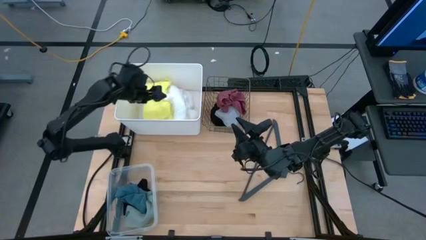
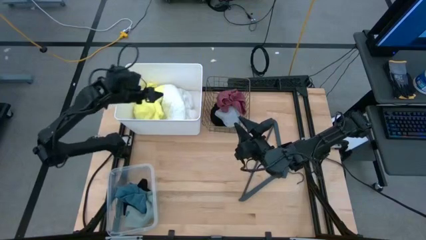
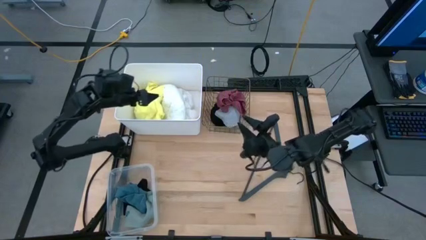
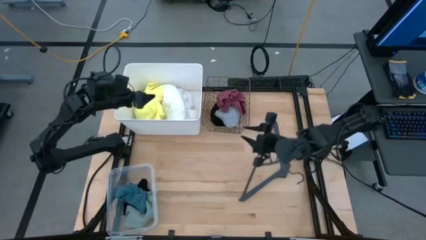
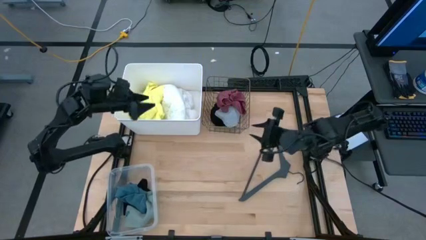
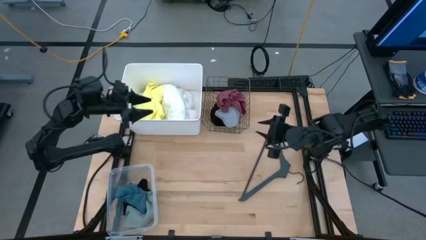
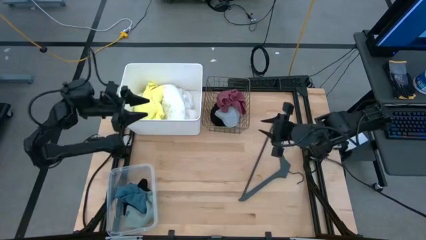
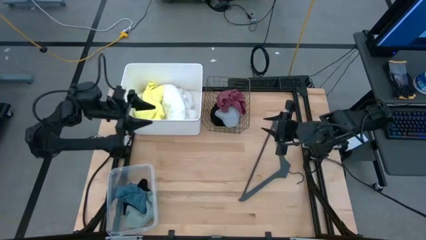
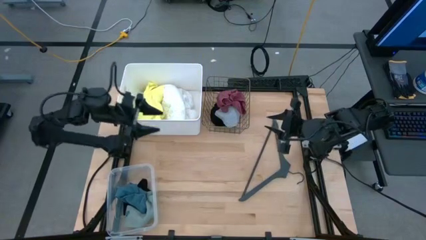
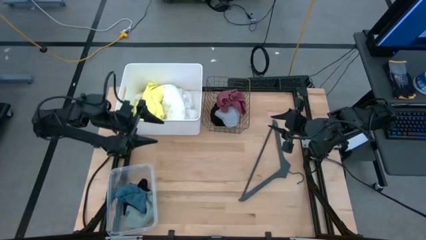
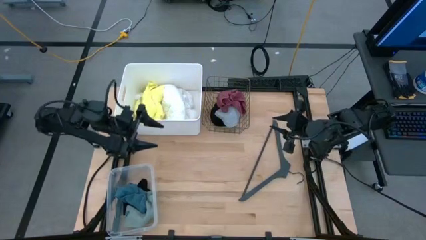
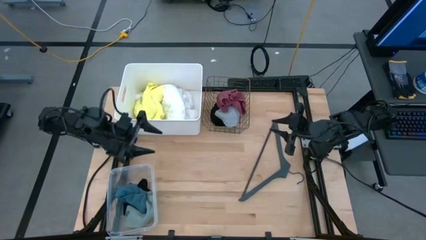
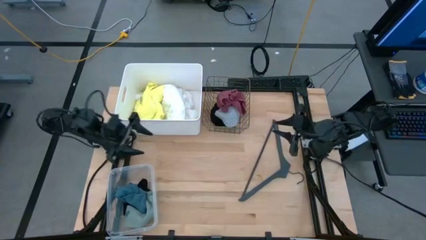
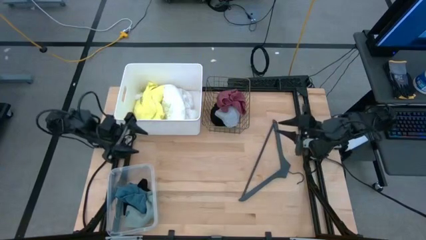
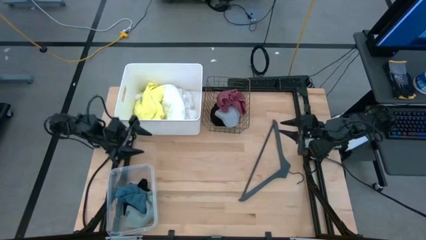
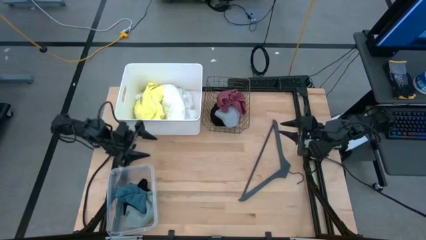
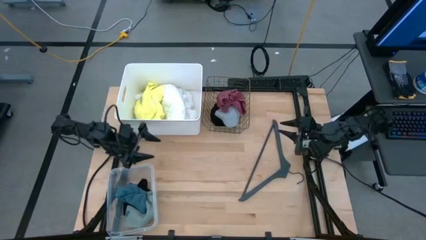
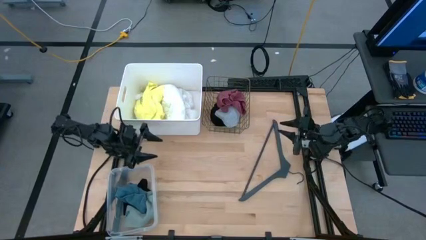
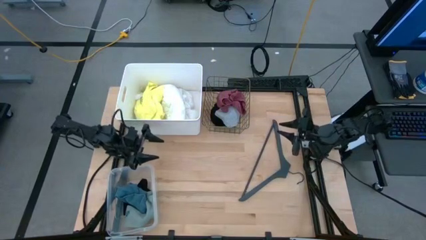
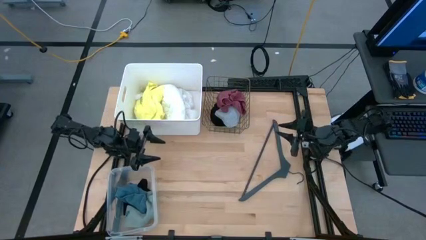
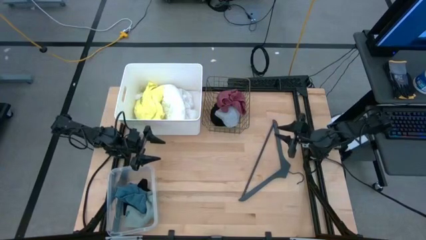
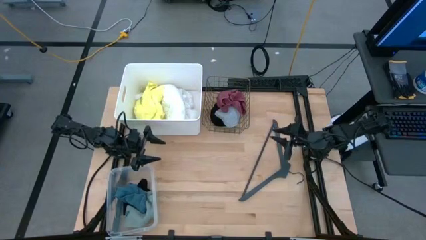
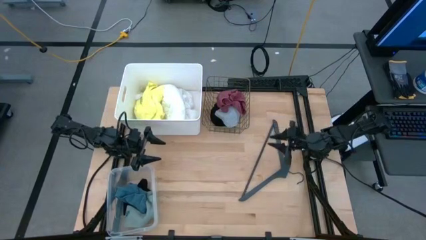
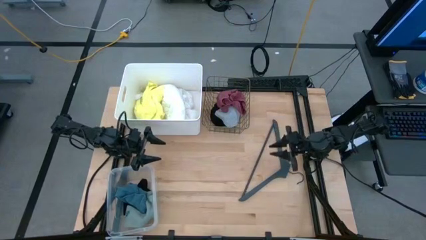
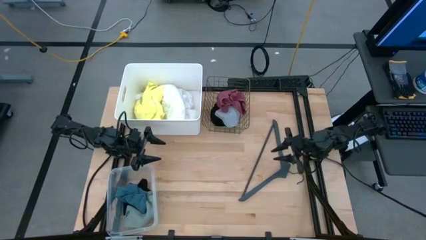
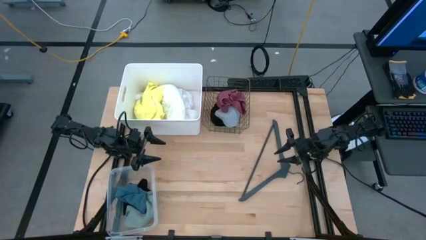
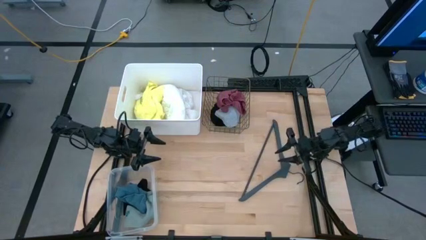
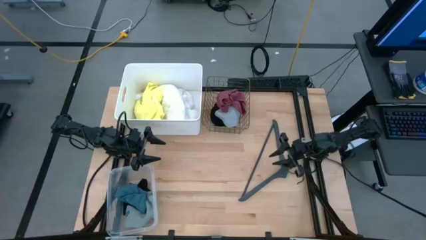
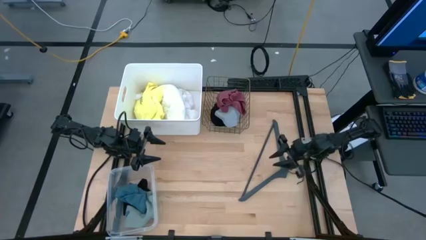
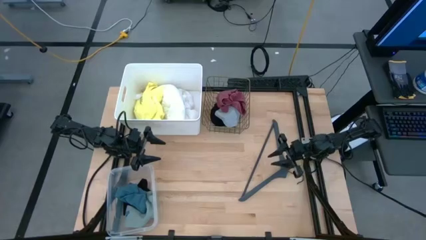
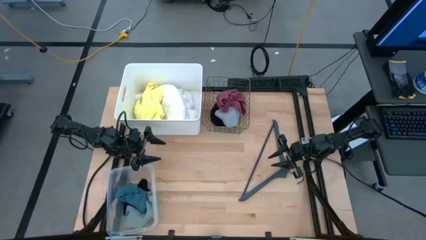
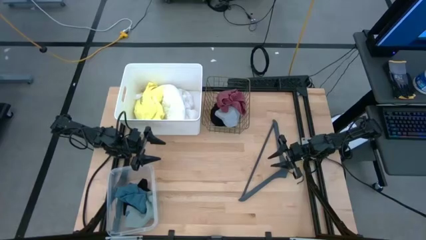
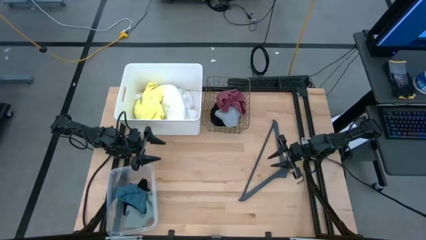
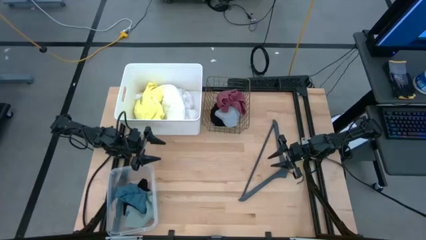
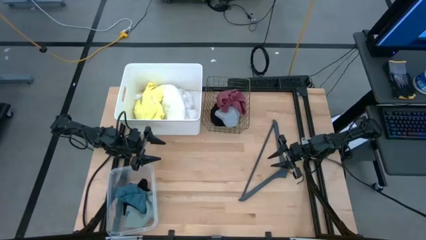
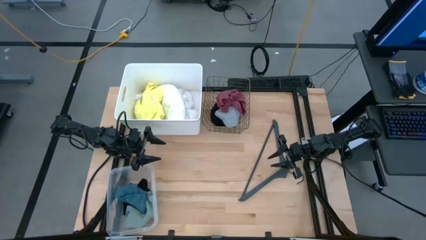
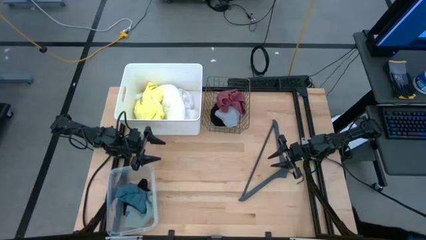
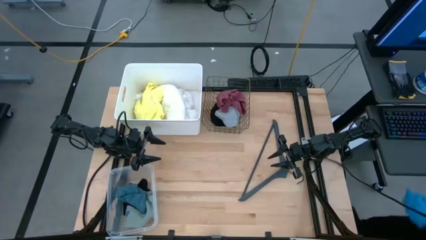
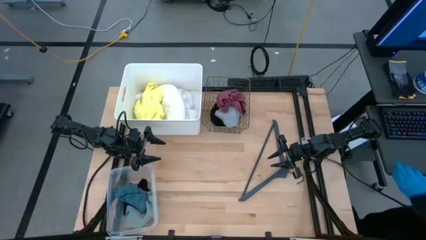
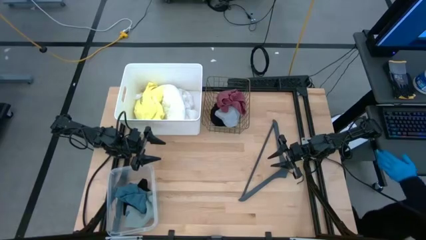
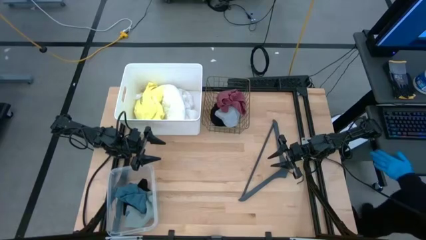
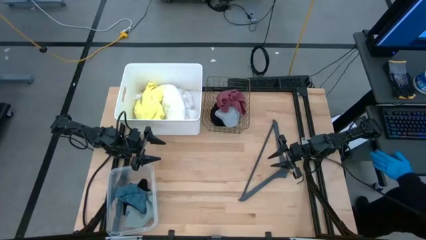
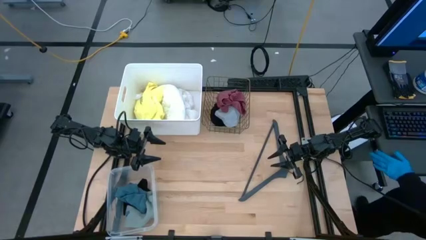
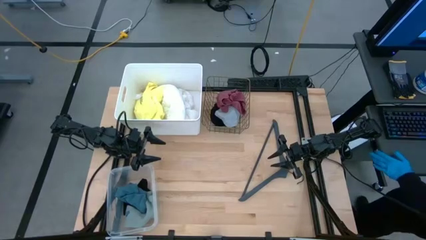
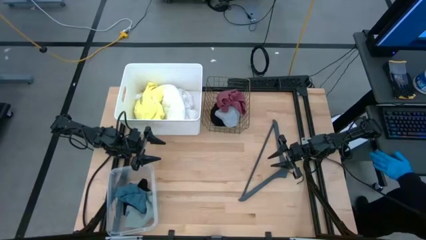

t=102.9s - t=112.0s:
Task: Pick & Place Cloths
Return to Home Position

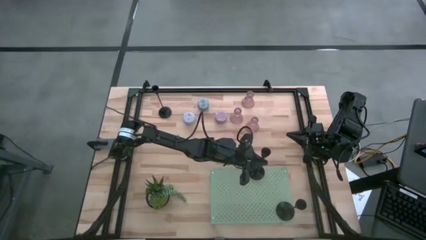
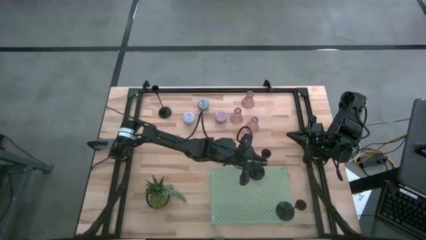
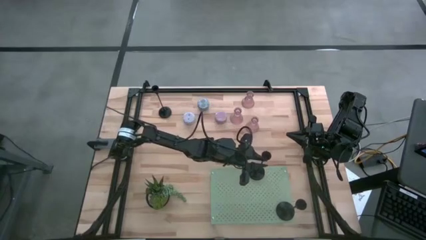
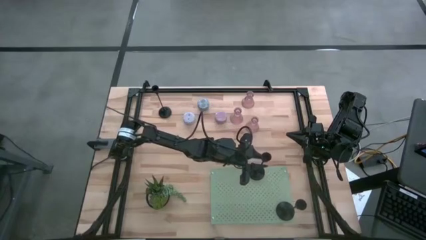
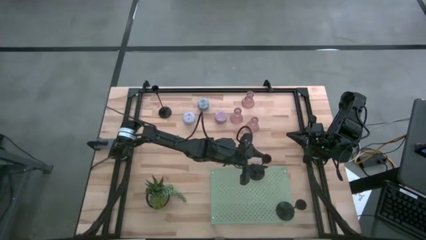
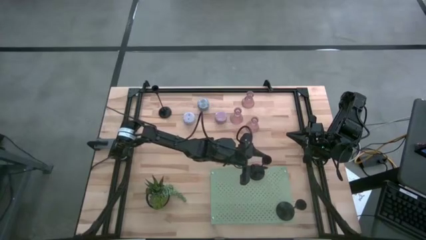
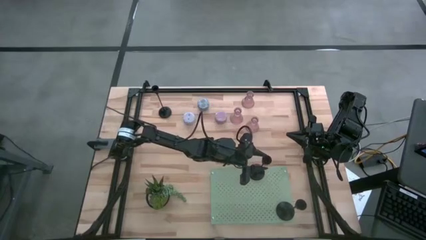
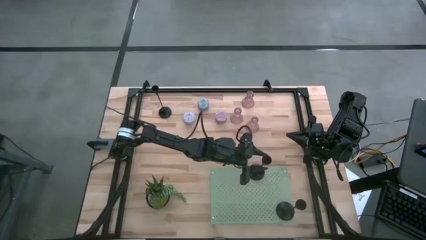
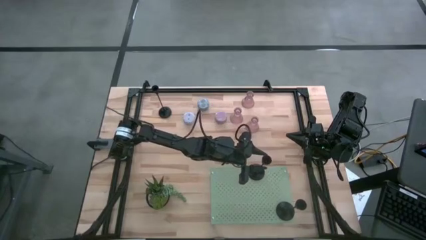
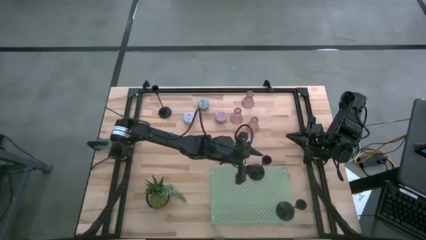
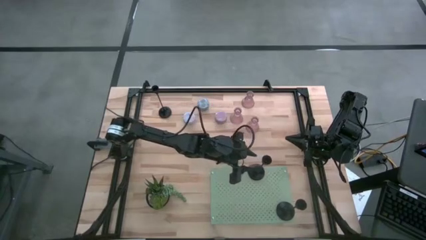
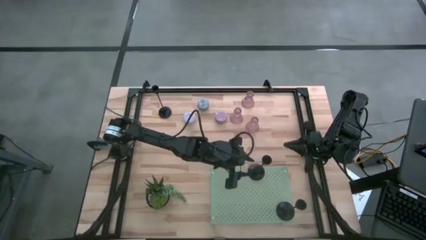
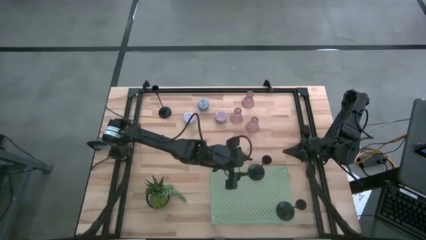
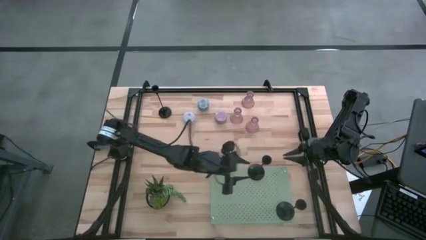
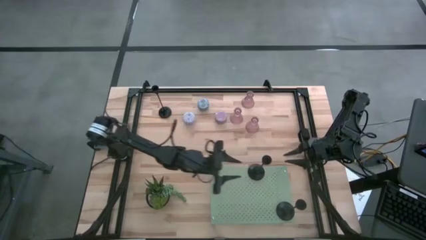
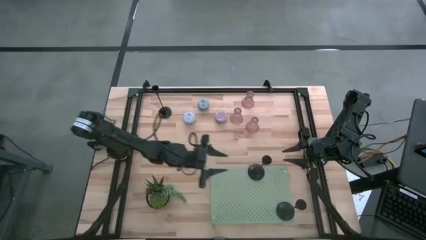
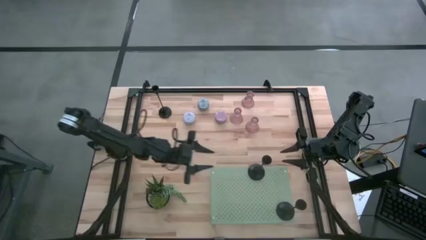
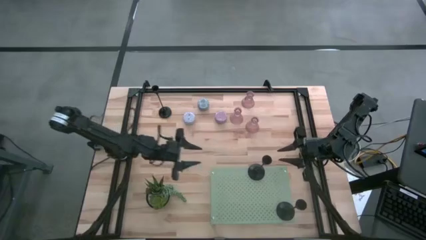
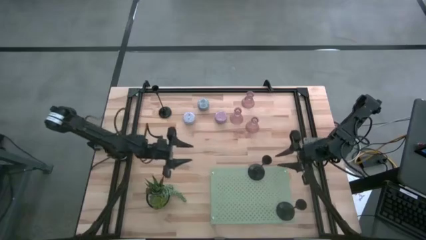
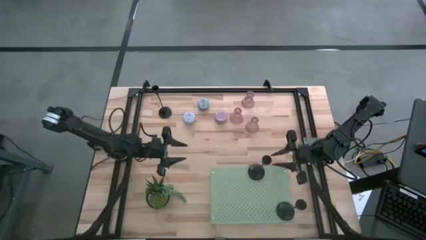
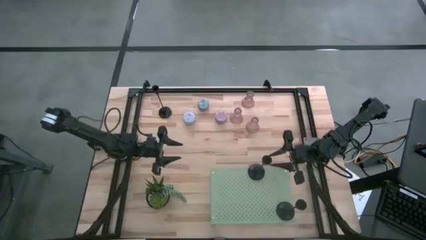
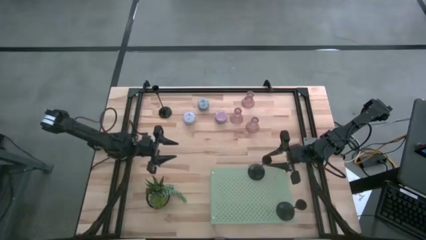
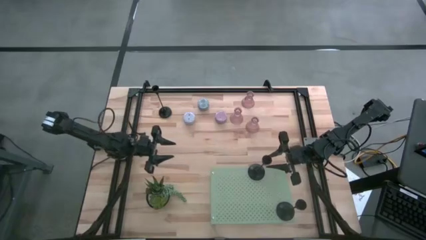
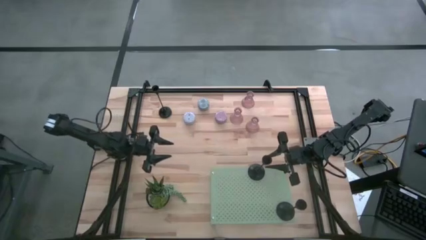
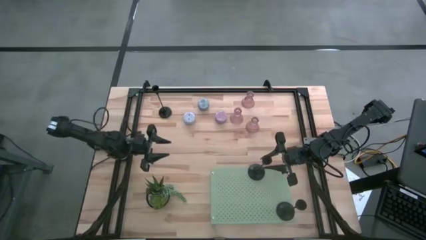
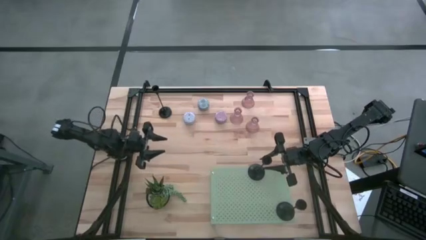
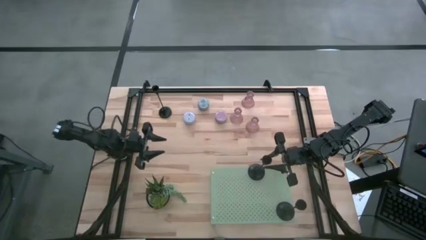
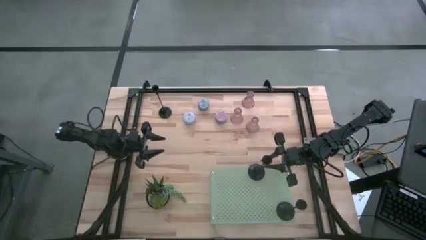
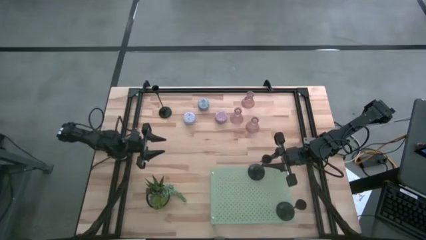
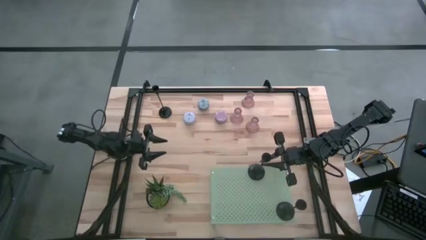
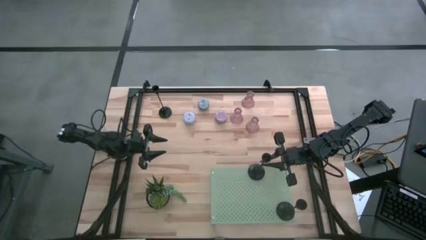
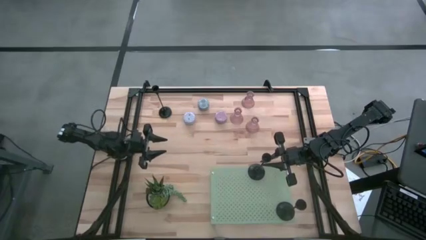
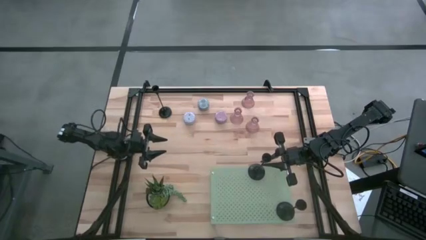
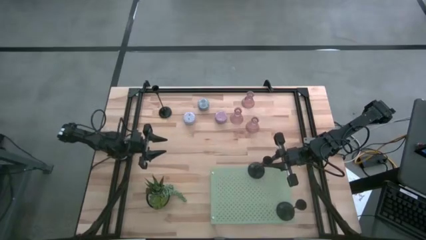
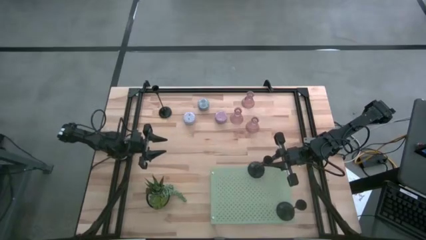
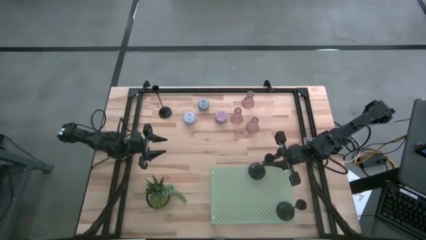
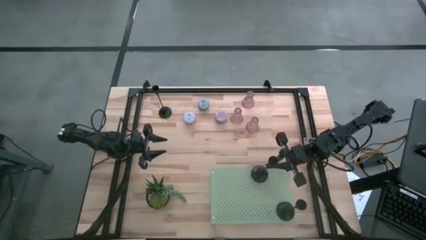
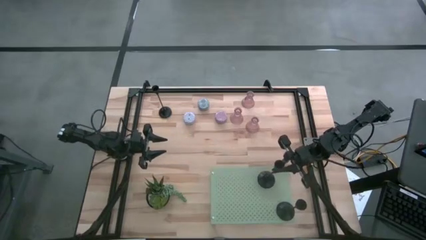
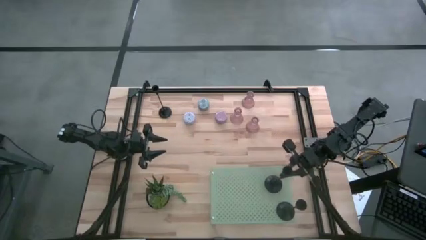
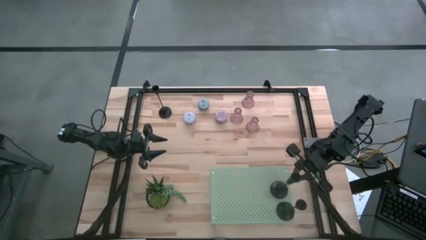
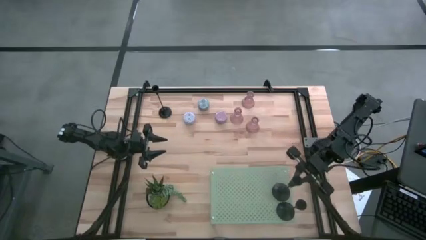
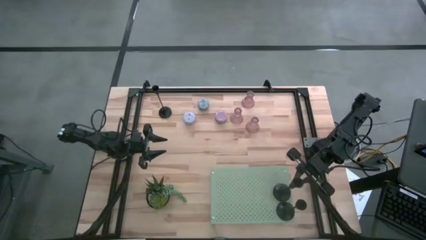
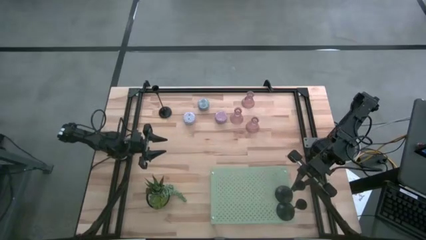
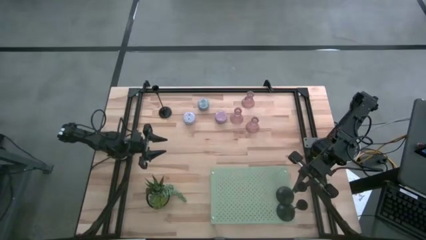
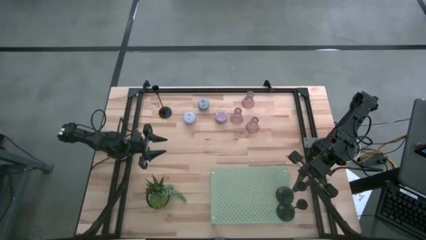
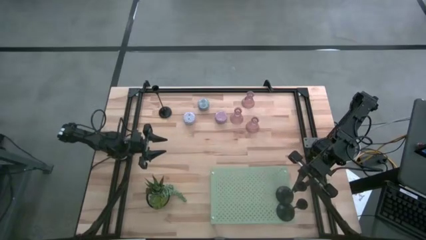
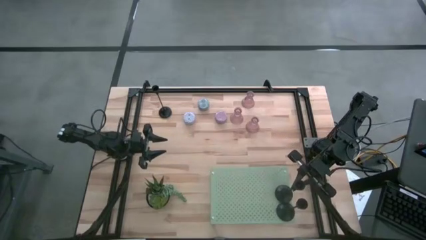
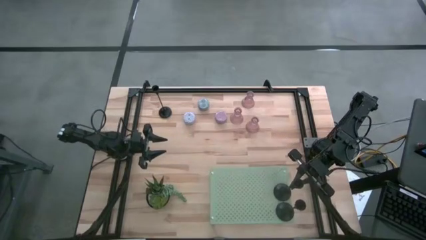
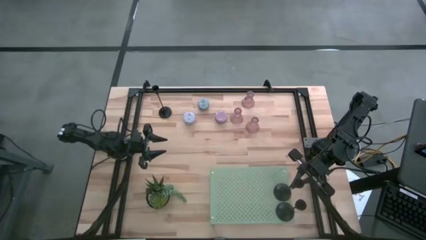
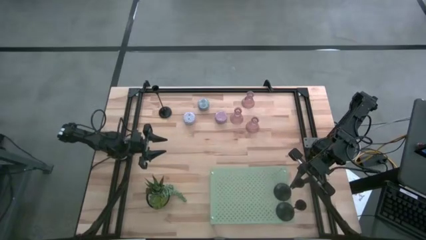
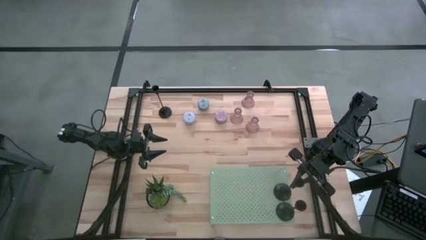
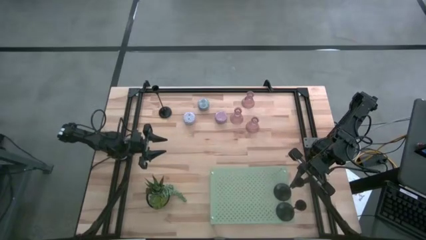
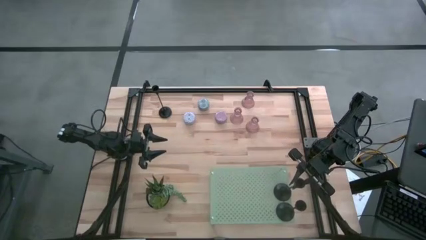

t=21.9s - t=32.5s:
Task: Pick & Place candle stick holders
Put the right black candle holder on the shelf aligned with the other black candle holder
